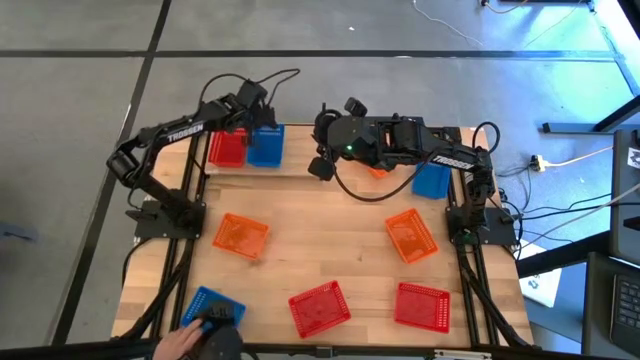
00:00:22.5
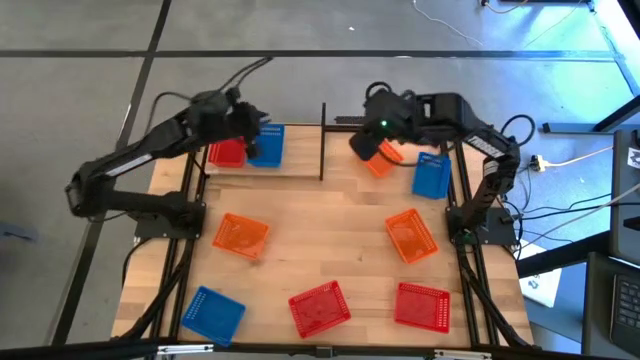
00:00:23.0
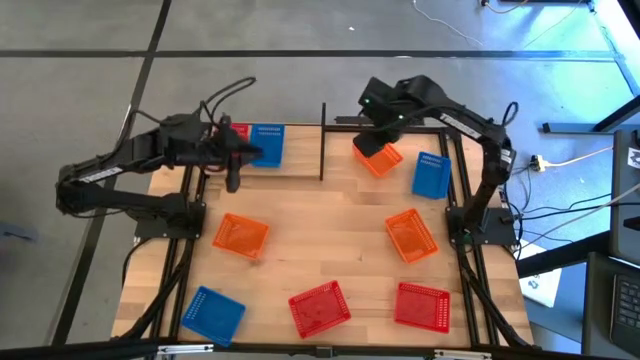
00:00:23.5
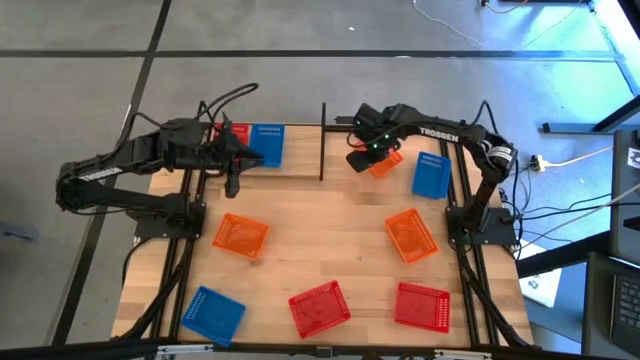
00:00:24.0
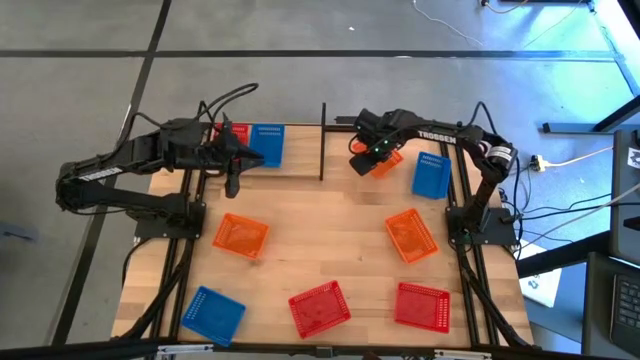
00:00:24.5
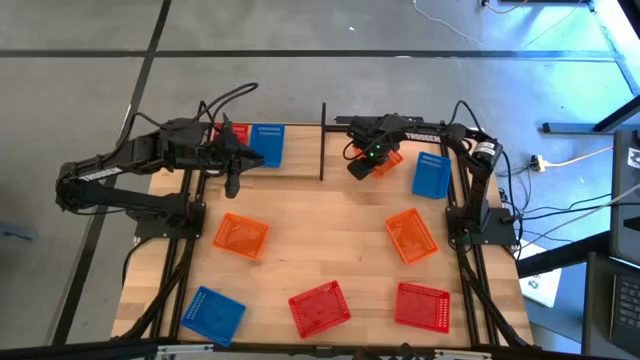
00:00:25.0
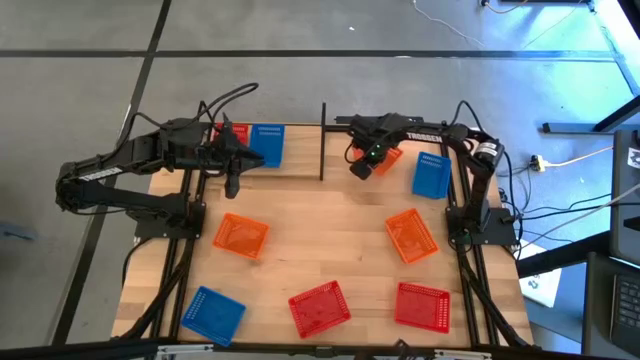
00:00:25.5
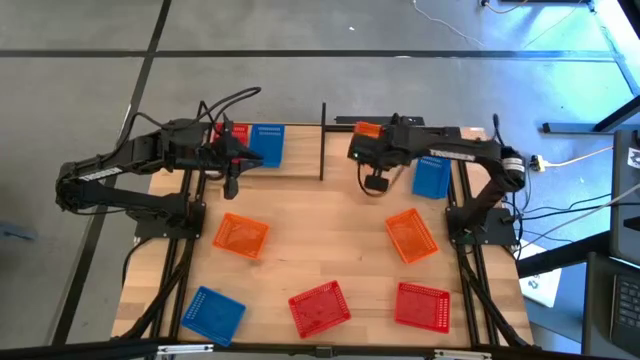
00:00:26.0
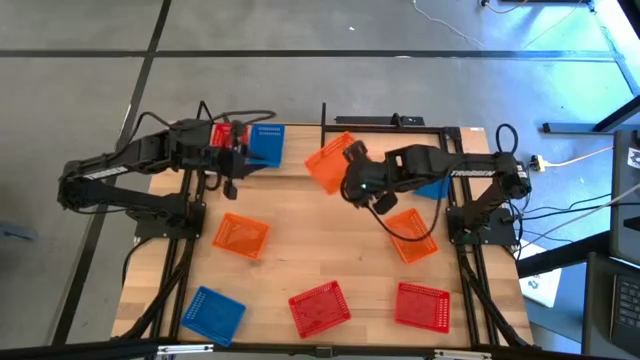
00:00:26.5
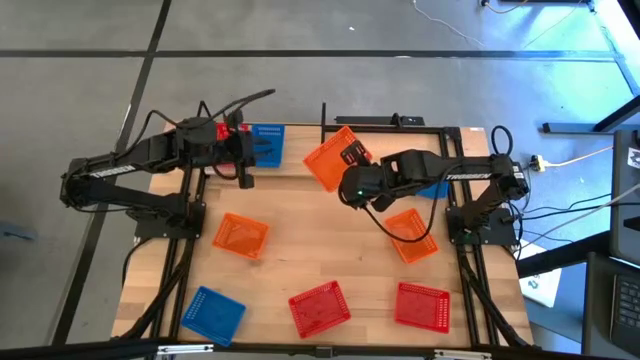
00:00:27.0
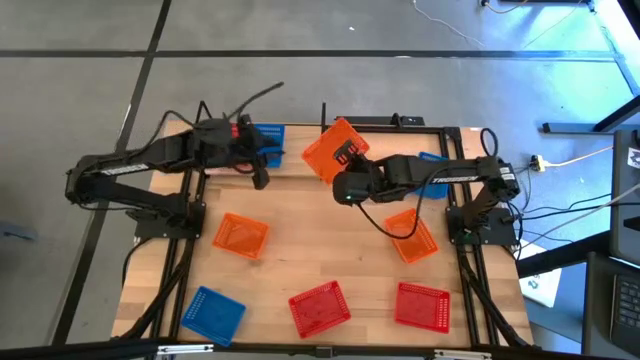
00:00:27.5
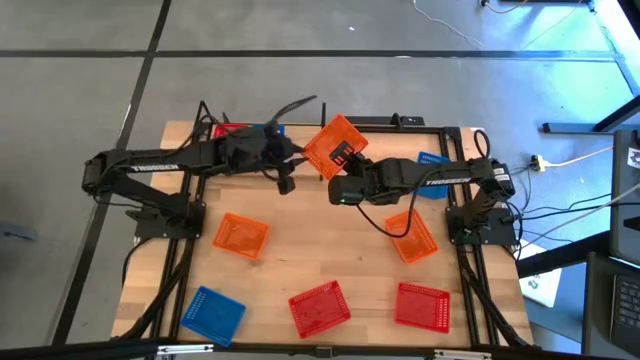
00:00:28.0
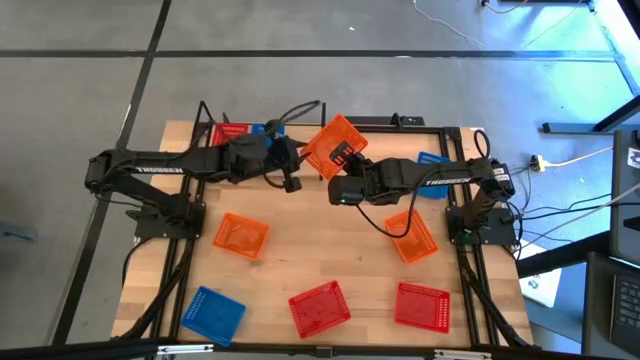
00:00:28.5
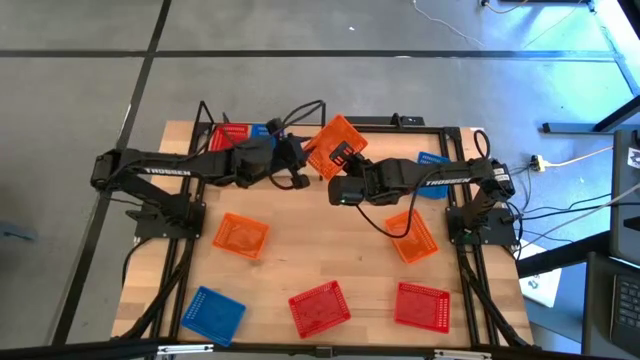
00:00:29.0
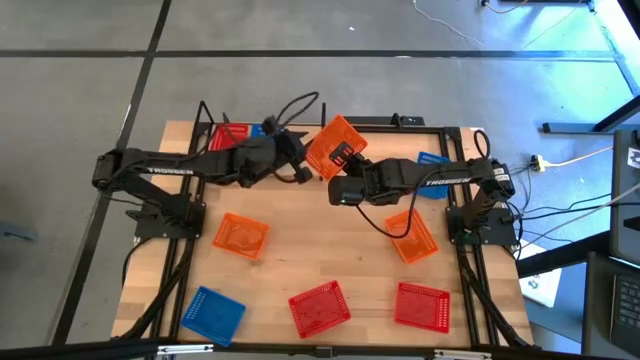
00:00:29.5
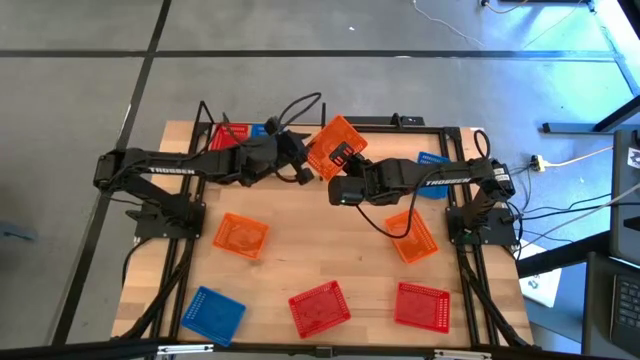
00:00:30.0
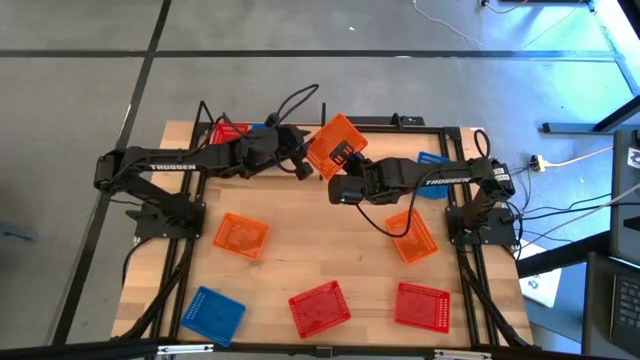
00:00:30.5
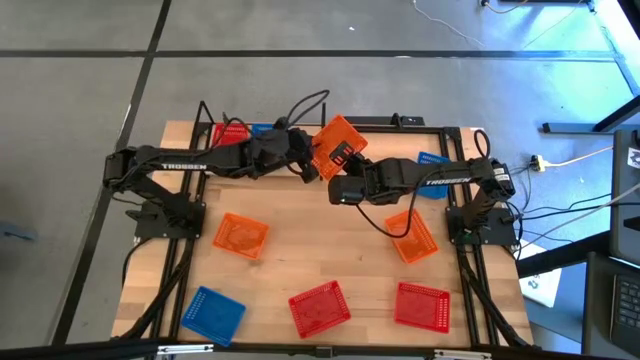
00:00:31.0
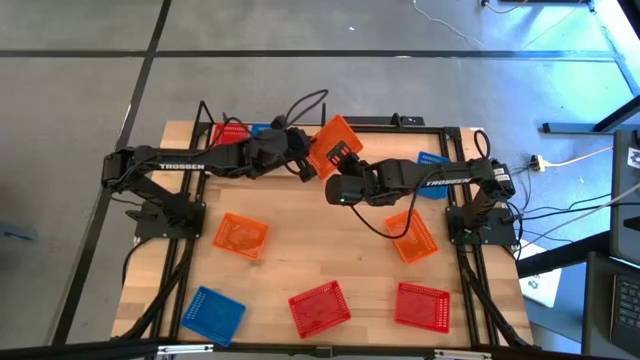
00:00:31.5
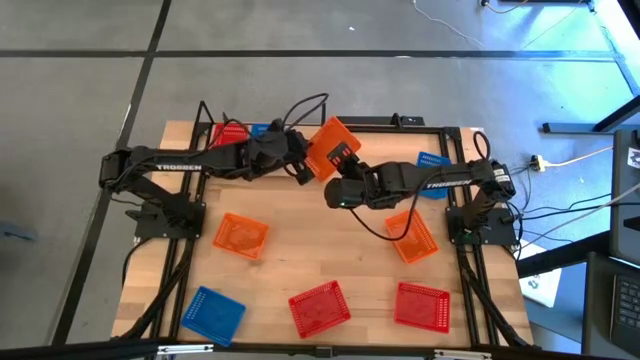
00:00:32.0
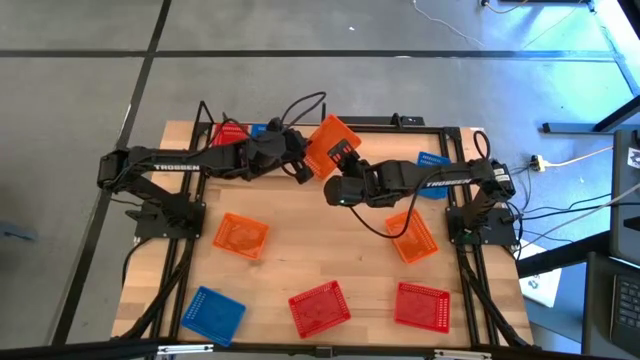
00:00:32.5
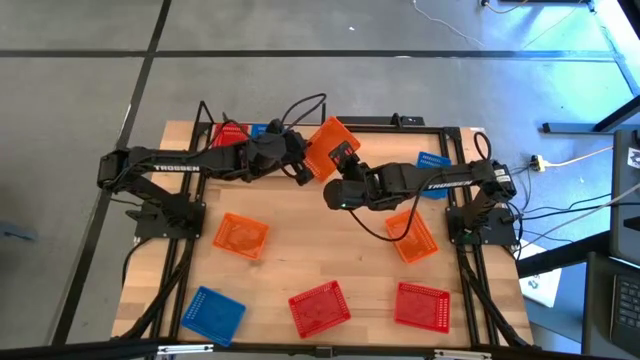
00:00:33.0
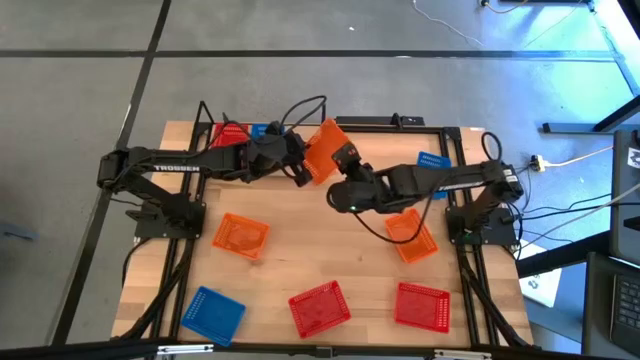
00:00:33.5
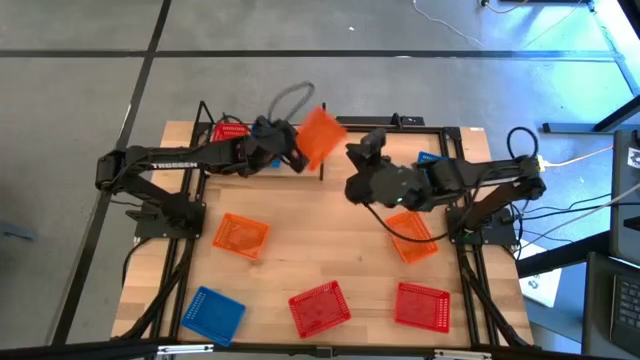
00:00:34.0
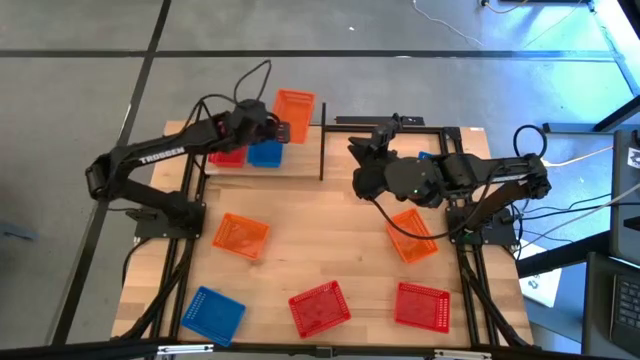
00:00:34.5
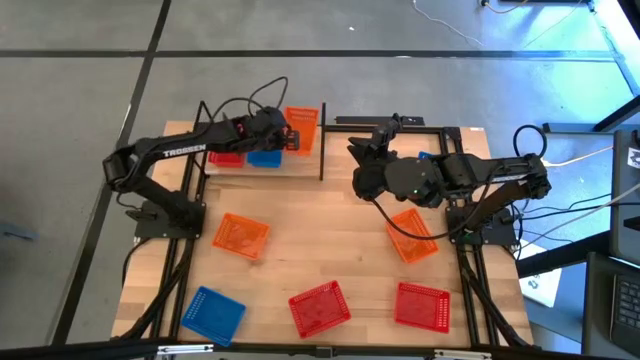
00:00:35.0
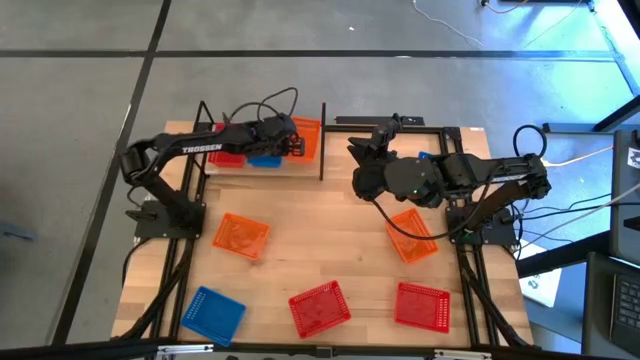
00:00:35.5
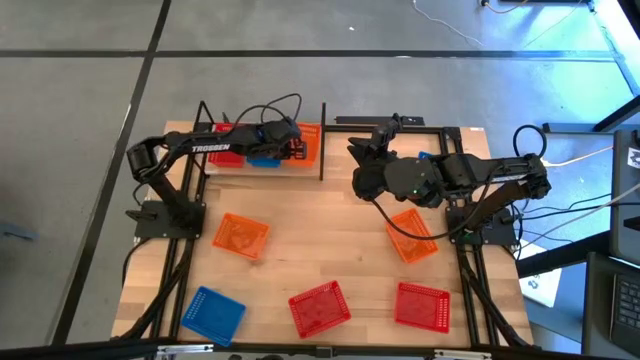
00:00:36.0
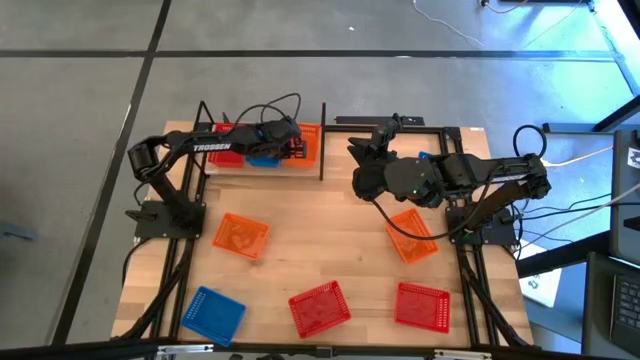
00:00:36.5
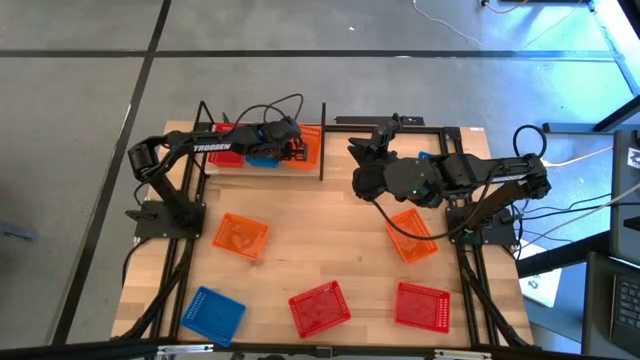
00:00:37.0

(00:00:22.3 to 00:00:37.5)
Task: Stack baskets on shelf by color
Put the top right orange bin on the shelf

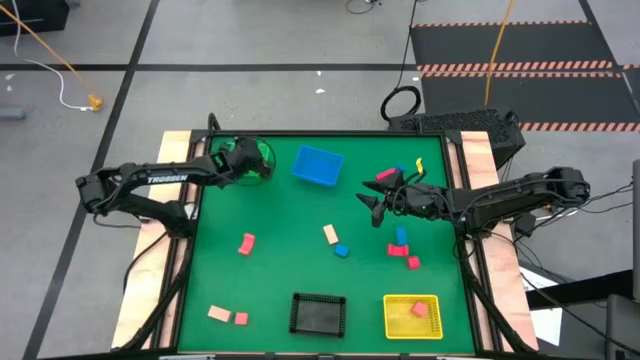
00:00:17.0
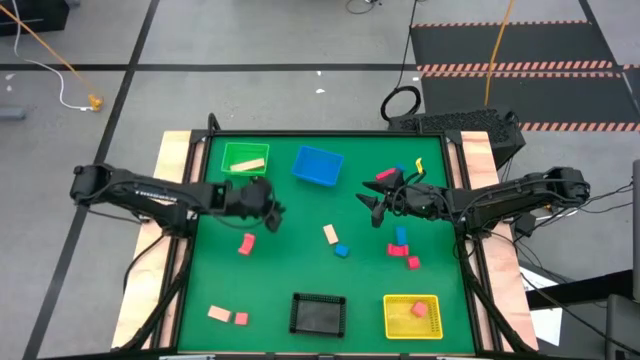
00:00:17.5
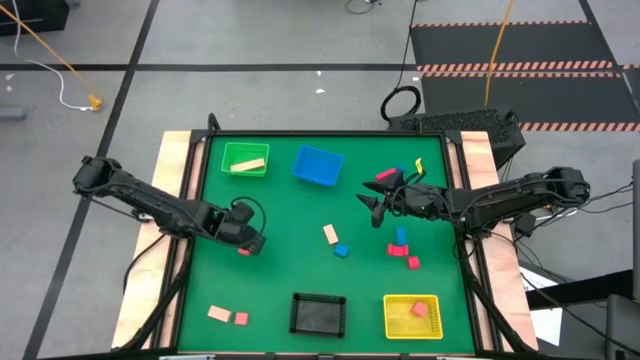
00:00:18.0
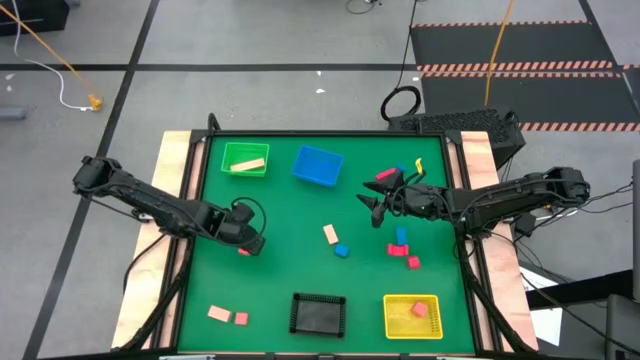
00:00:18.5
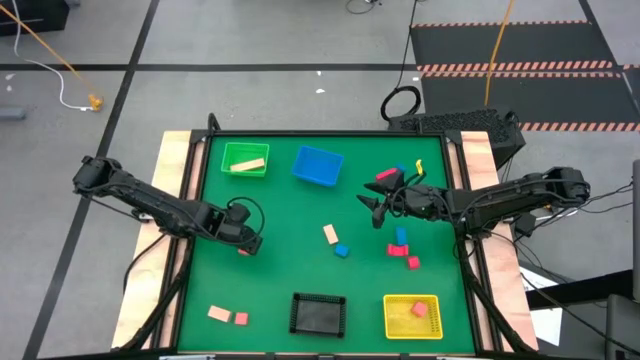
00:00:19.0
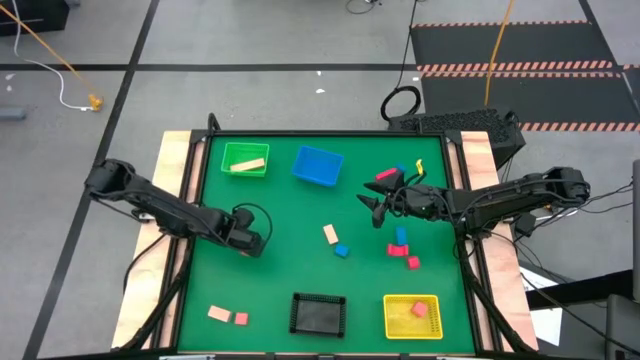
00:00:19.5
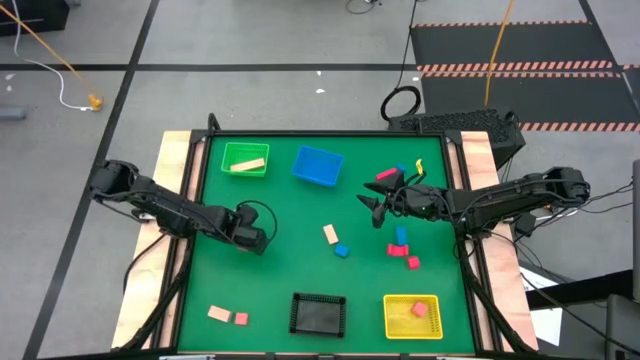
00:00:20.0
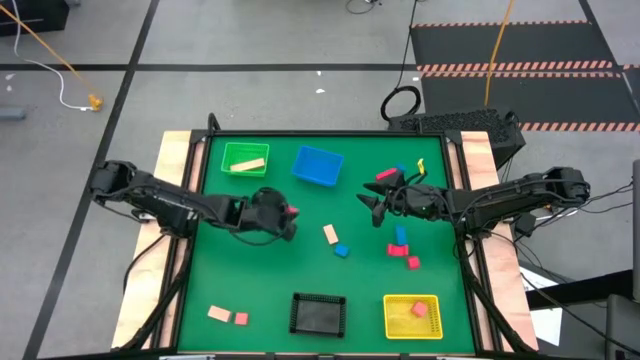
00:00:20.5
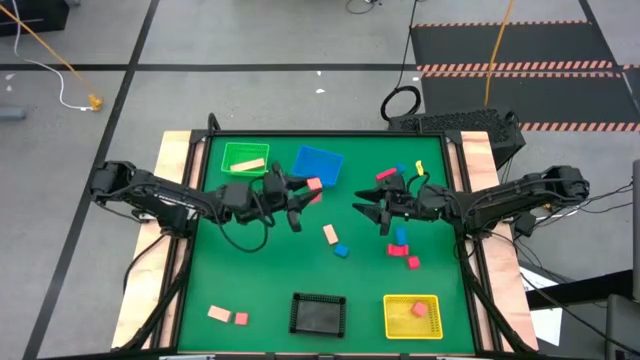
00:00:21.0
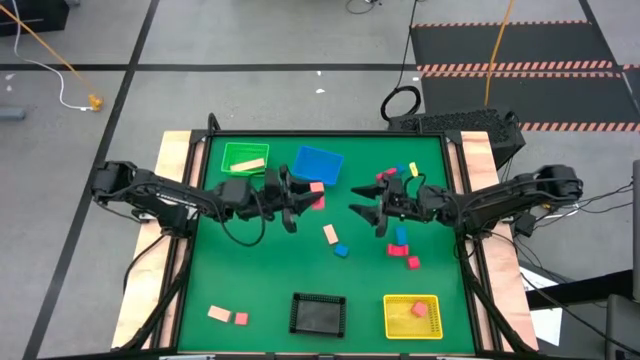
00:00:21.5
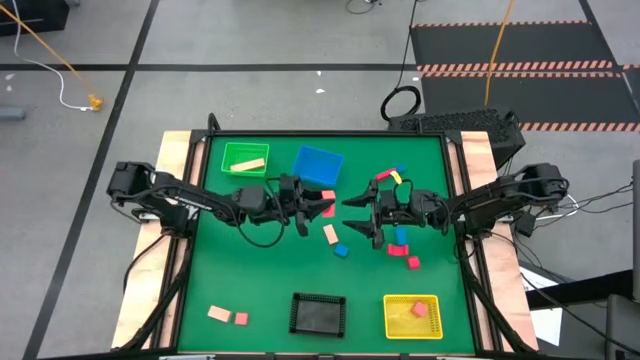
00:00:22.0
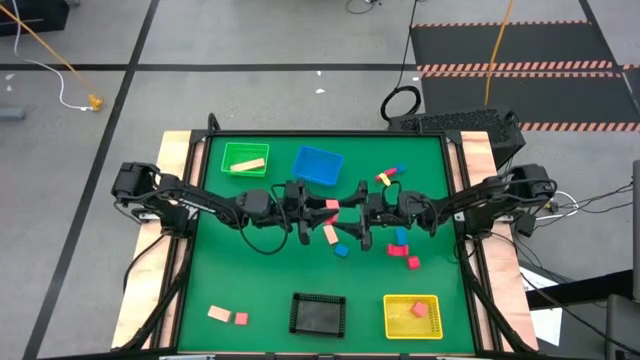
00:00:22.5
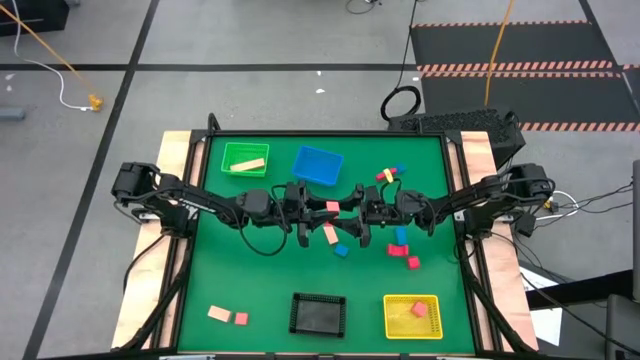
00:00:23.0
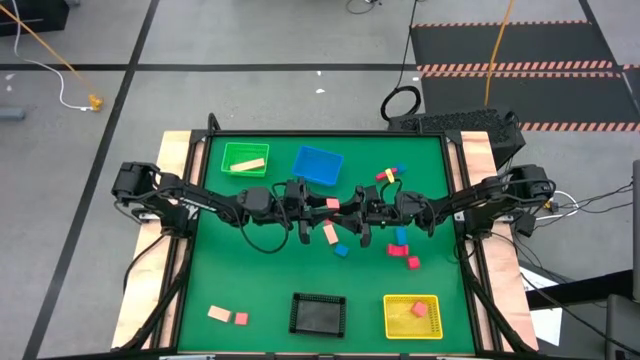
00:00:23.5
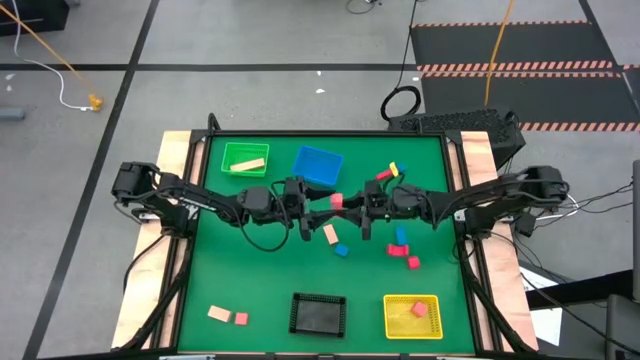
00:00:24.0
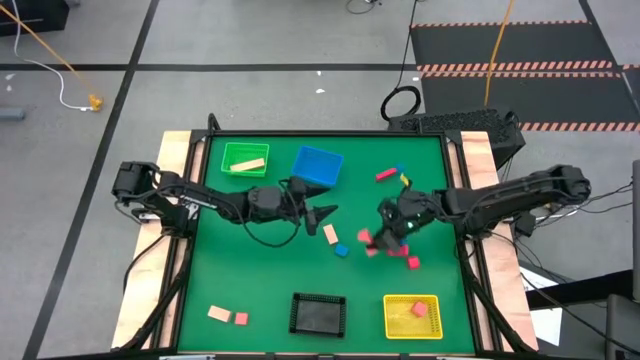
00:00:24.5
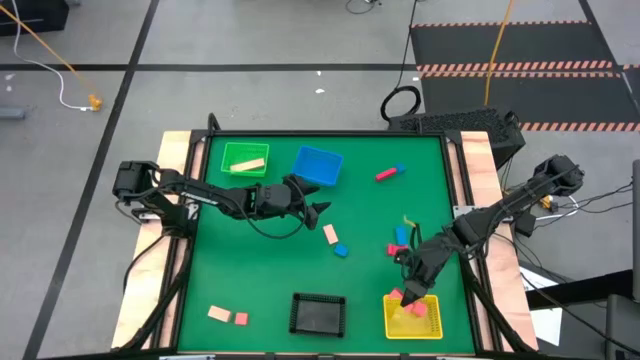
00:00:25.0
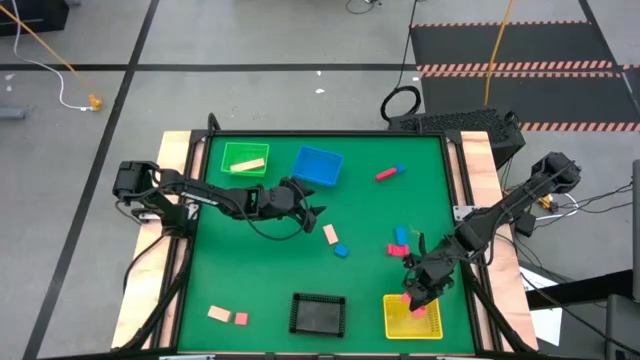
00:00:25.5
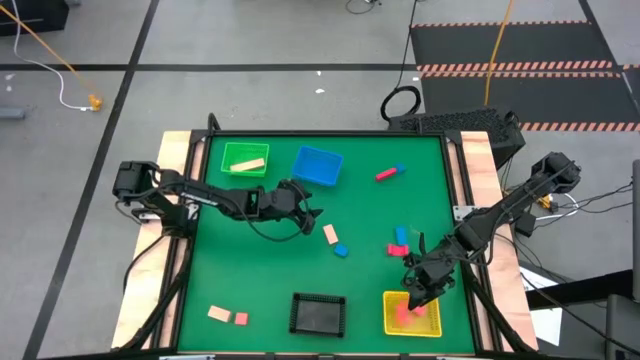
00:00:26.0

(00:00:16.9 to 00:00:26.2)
Task: Sort & place blocks by color
Put the top pink wooden block into the yellow basket
